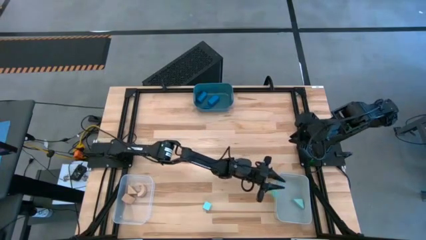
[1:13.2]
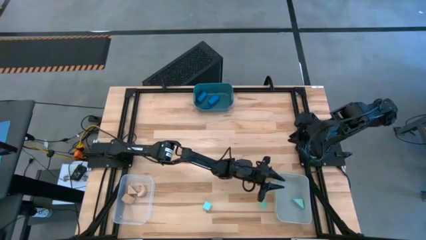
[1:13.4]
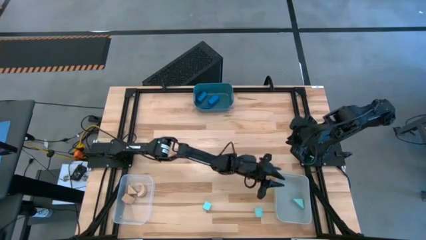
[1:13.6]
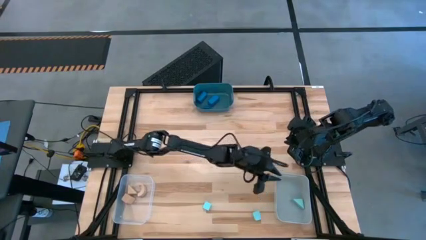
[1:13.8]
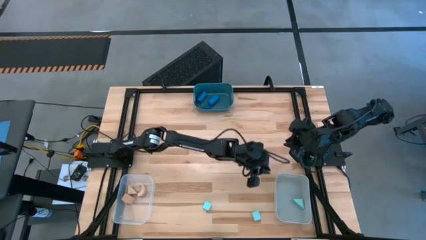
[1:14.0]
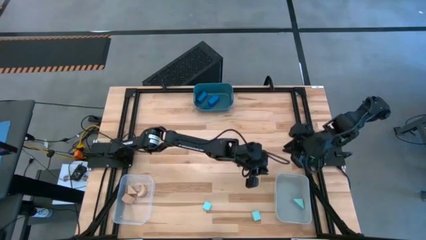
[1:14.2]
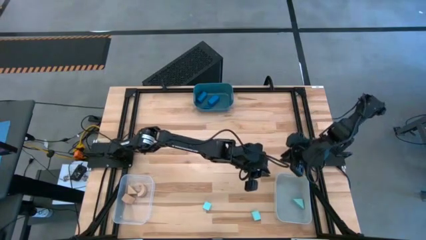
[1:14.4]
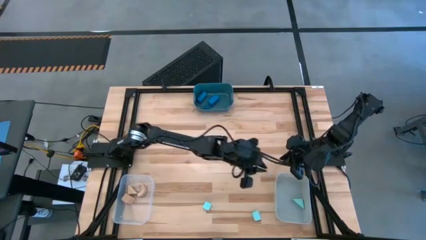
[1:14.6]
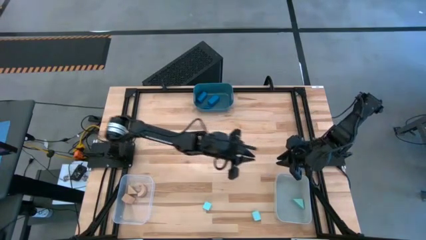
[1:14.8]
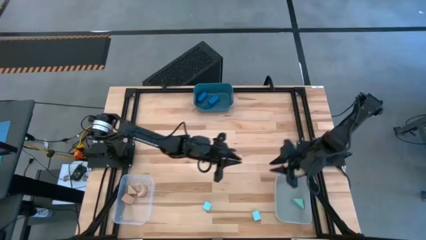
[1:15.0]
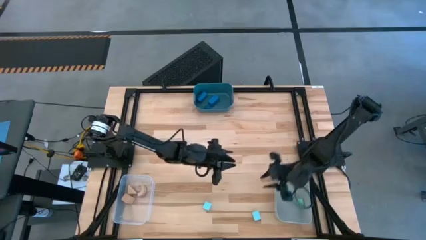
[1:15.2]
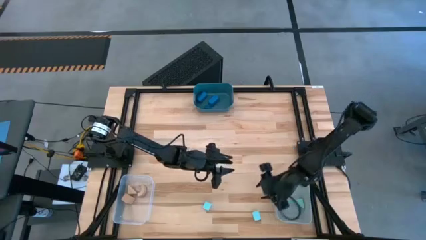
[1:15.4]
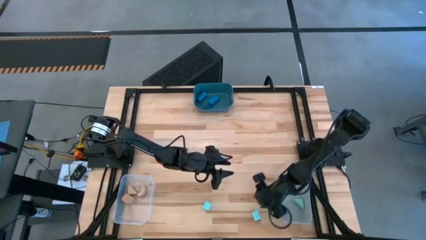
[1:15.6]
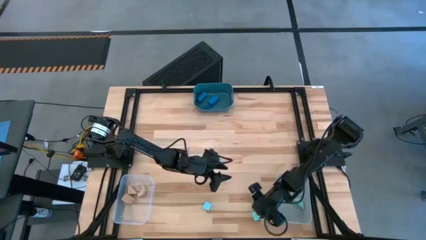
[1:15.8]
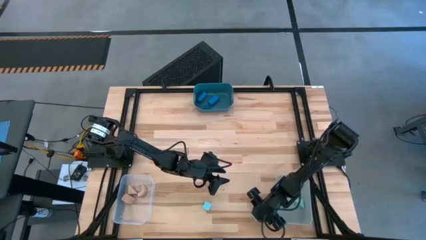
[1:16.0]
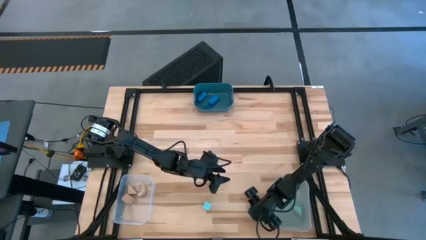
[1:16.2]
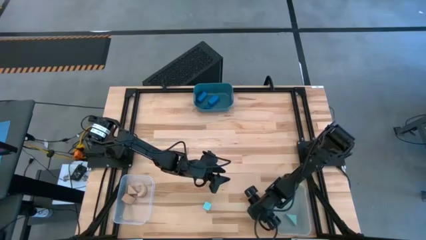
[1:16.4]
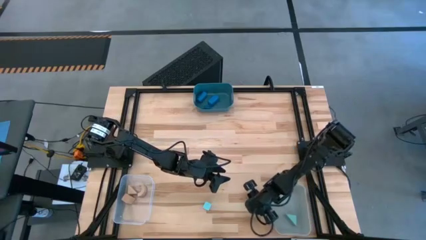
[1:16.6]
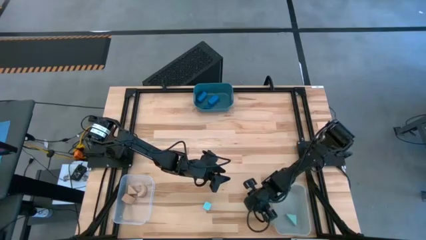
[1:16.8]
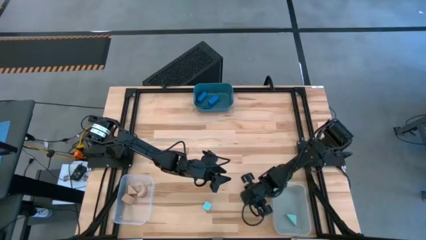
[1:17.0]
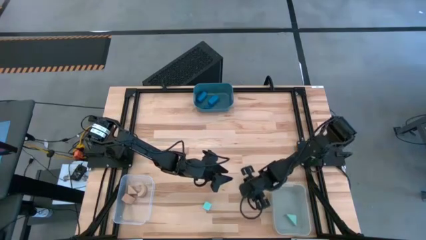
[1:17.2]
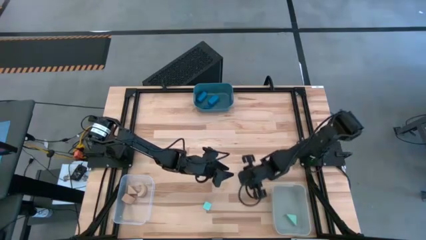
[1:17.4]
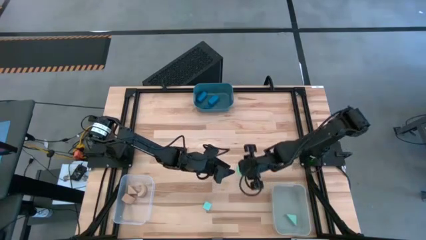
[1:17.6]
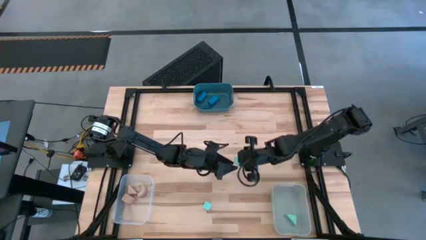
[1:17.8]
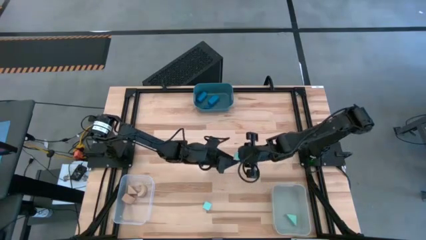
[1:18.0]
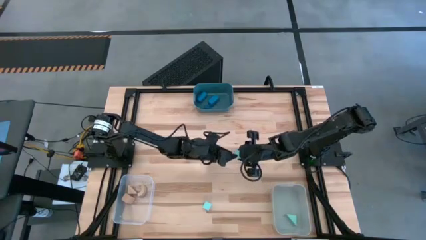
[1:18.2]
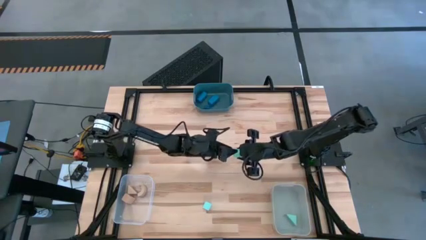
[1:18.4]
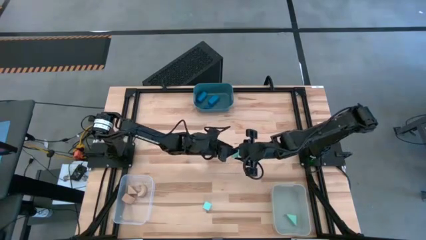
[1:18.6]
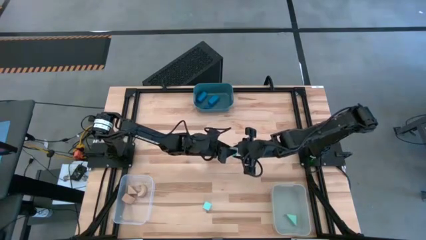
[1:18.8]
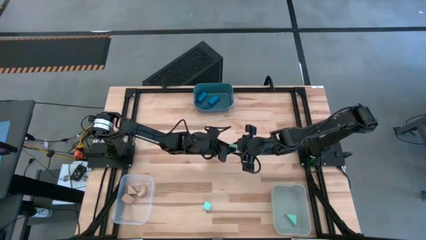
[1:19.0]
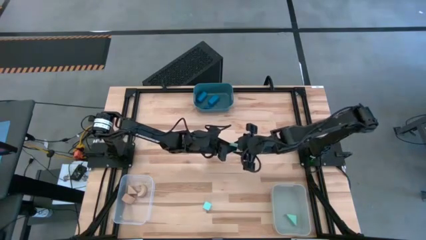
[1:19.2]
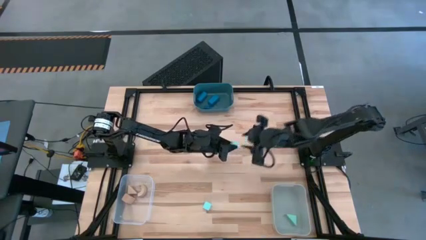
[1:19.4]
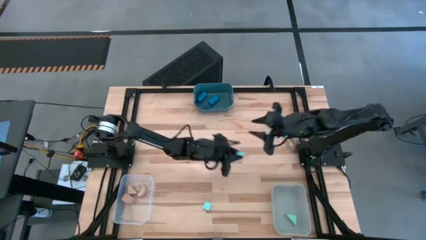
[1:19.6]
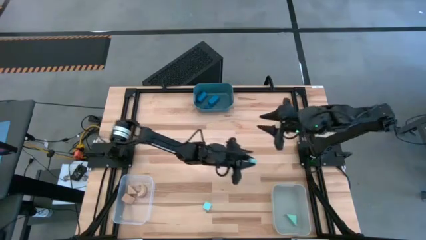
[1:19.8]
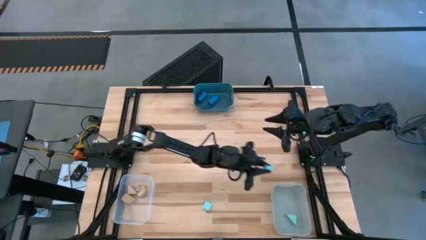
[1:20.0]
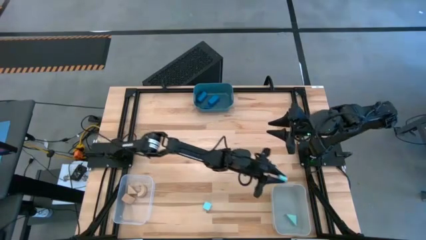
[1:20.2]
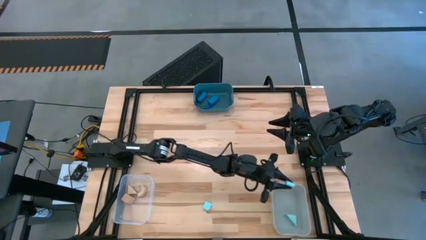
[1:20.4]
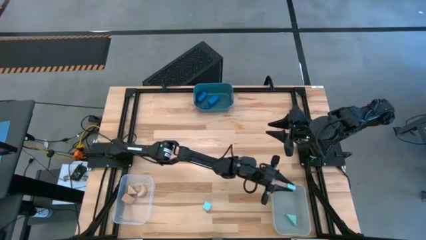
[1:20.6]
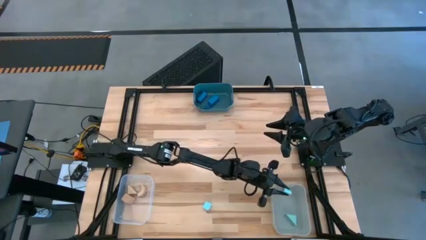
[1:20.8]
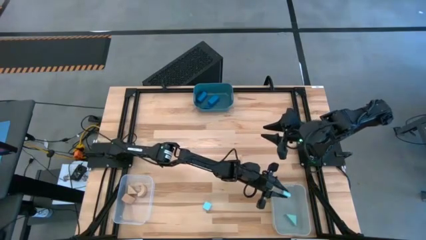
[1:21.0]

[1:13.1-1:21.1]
Task: Sort & place blocks by color
Put the top light blue block into the gray bin

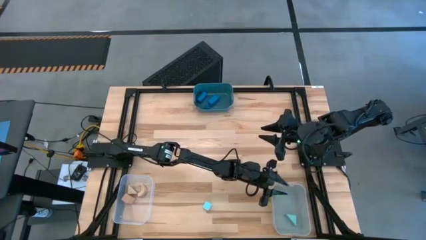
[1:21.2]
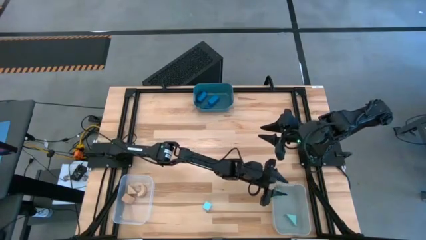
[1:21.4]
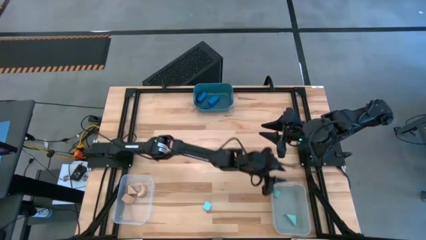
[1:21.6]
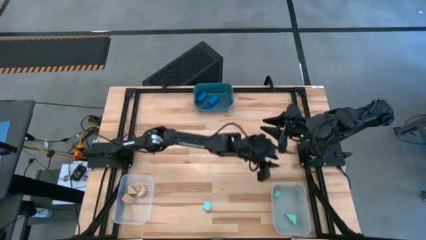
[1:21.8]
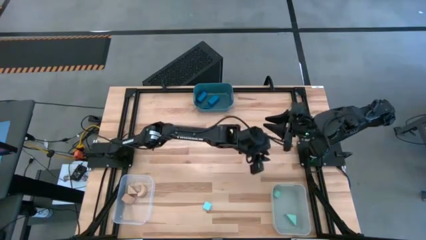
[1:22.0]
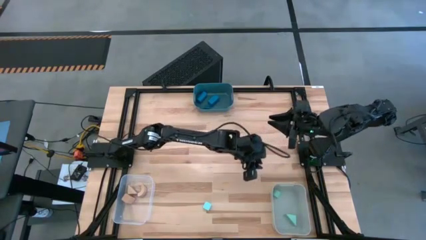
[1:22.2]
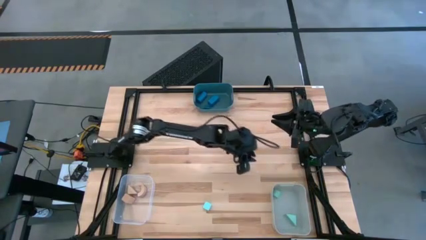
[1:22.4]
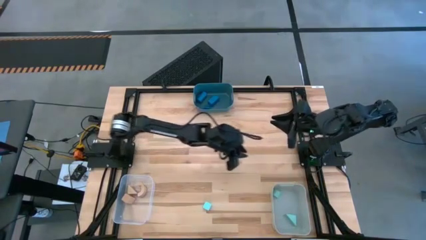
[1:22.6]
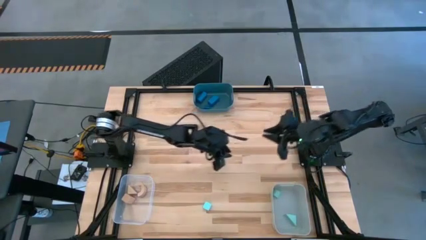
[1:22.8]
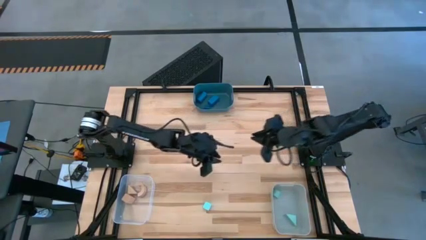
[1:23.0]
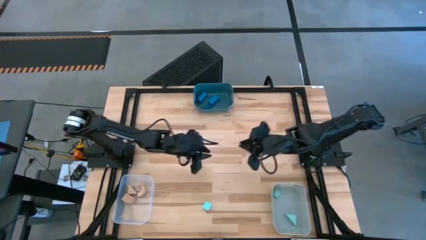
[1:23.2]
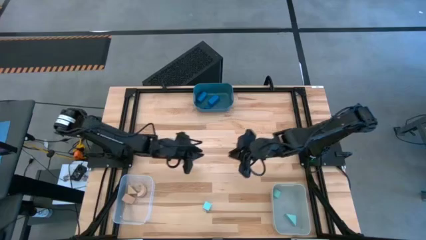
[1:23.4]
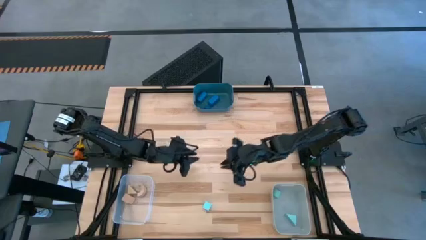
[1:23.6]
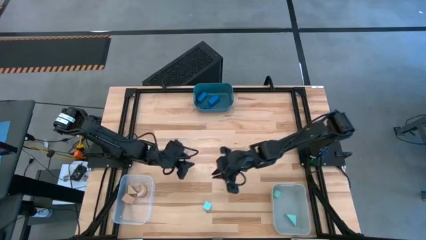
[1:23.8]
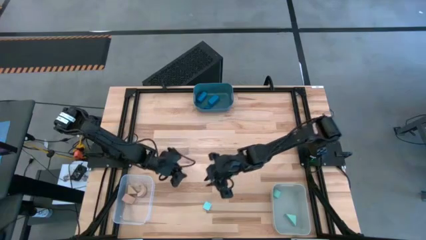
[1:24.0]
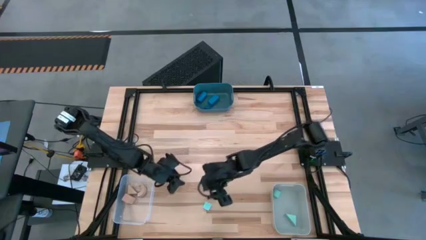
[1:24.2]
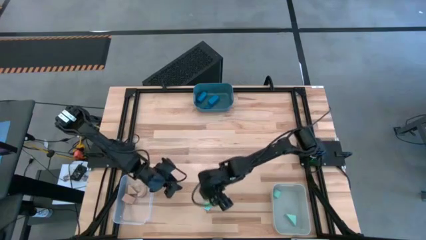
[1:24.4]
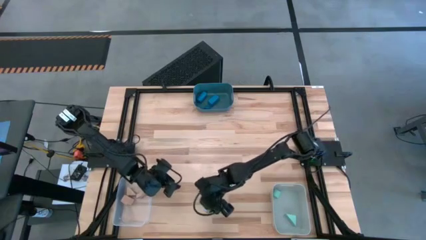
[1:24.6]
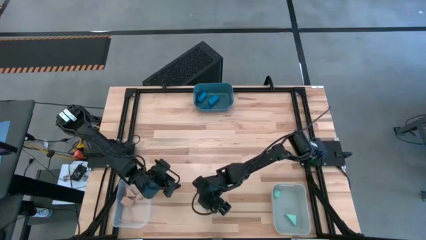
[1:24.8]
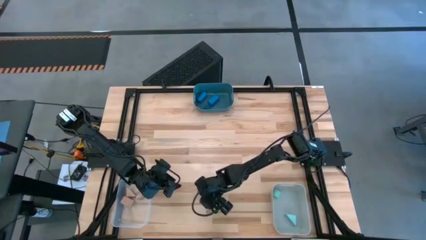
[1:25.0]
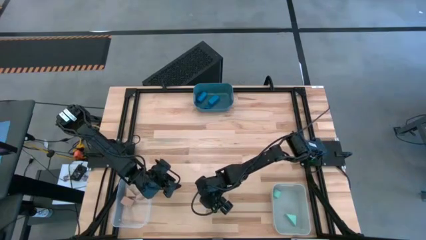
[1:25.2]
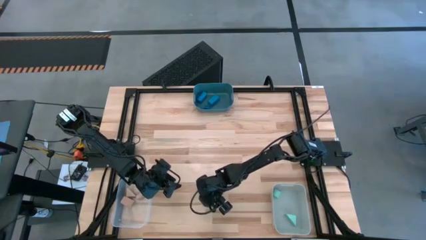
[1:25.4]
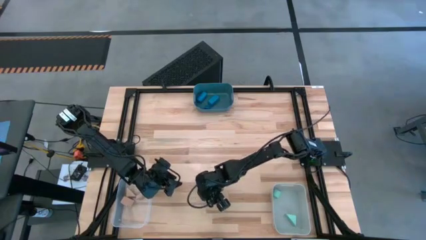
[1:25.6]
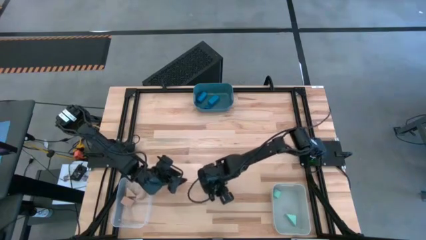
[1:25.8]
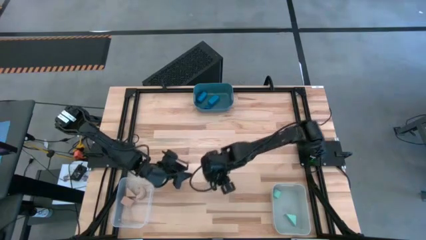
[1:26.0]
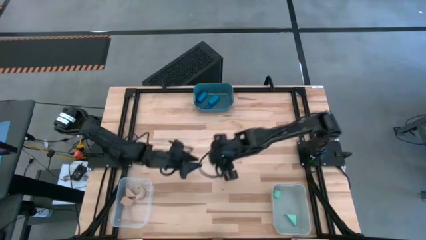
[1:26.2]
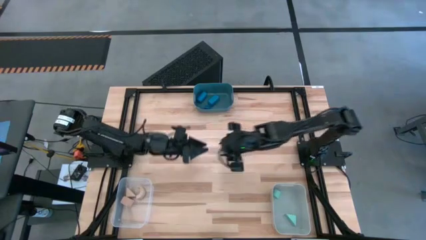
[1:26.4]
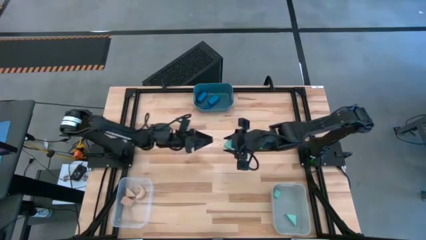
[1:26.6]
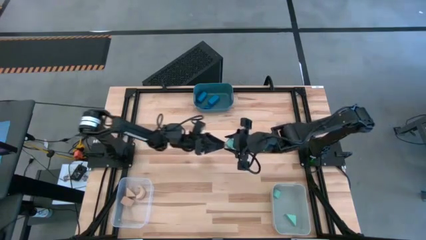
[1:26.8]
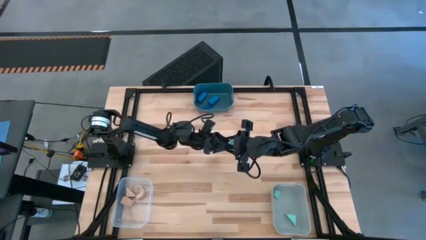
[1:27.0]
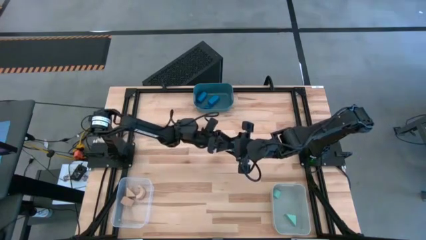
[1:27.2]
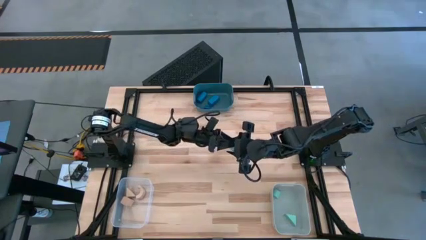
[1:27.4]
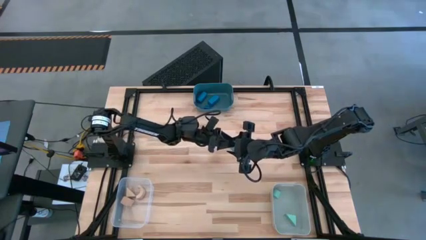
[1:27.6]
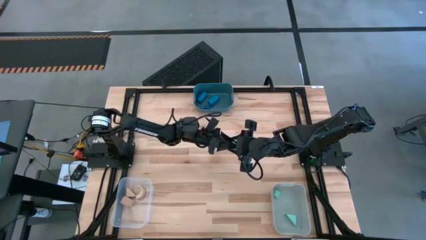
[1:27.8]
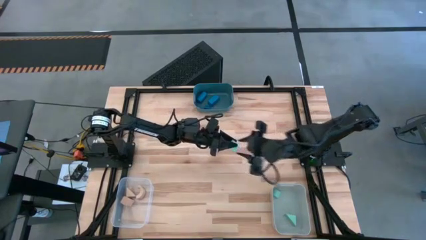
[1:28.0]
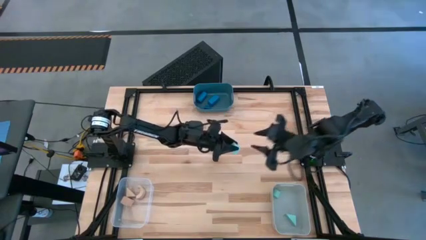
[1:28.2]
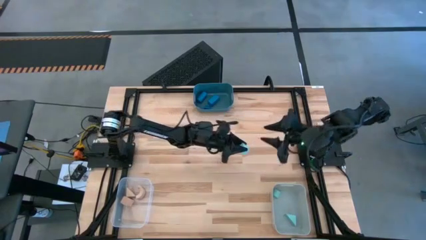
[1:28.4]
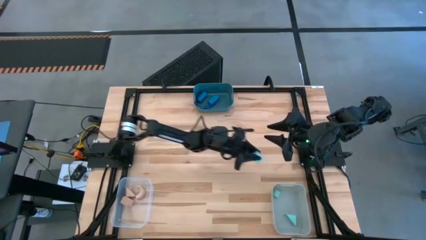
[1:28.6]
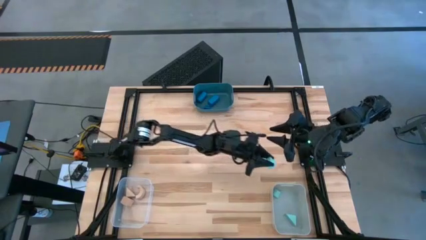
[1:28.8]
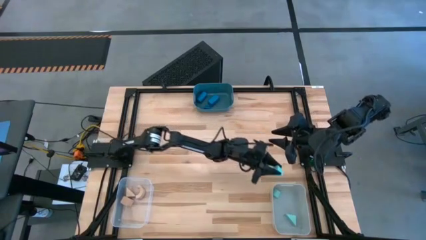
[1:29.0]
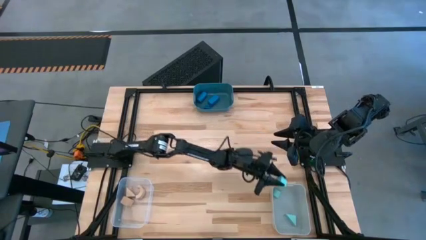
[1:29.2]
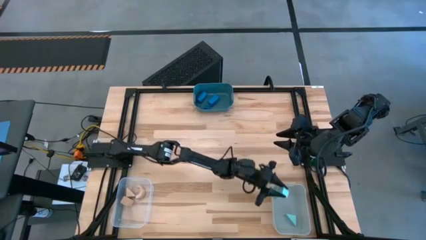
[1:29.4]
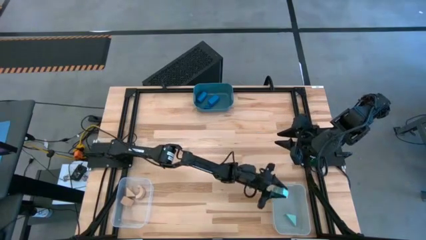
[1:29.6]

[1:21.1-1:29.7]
Put the light blue block into the gray bin
